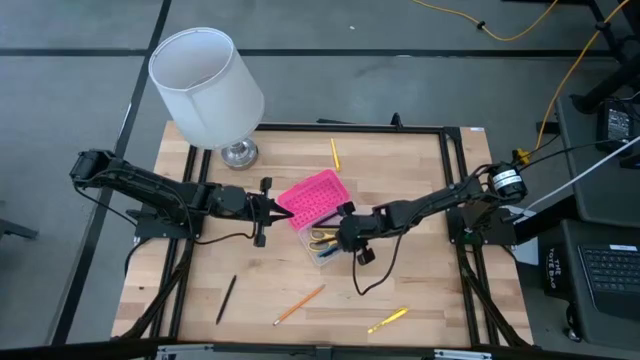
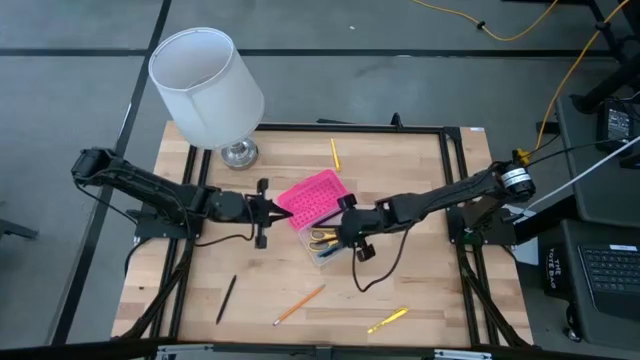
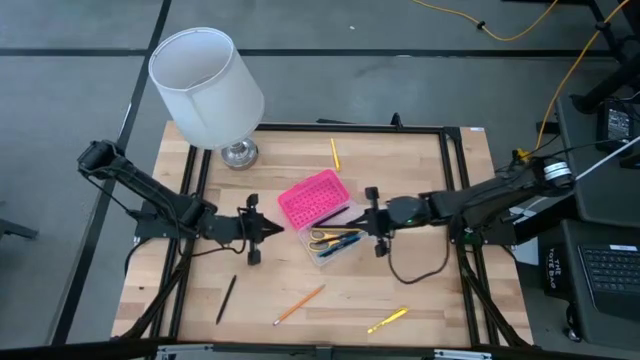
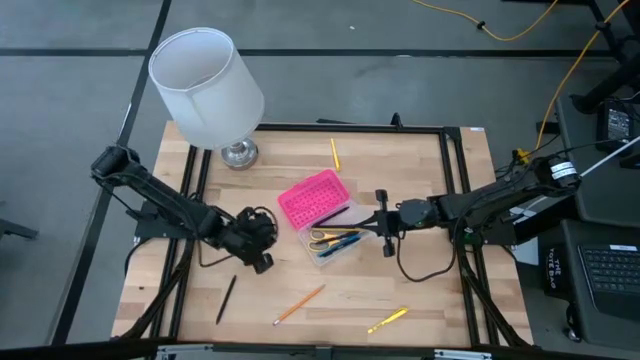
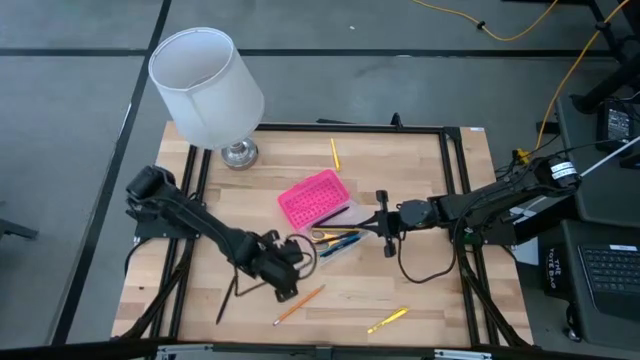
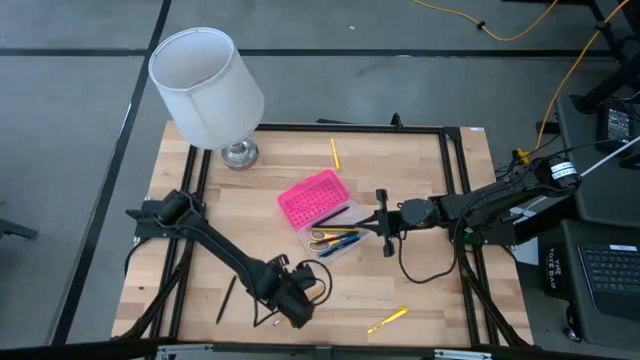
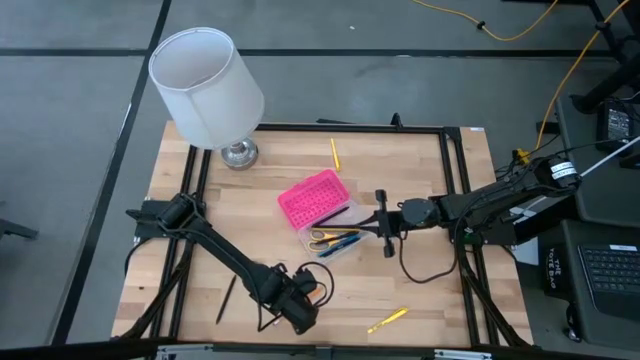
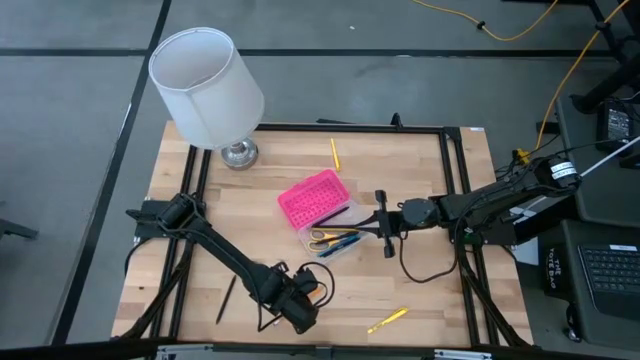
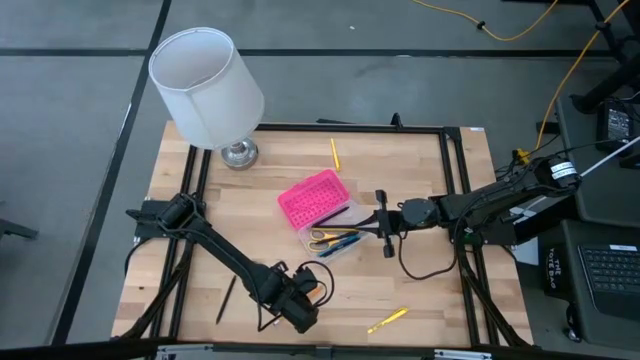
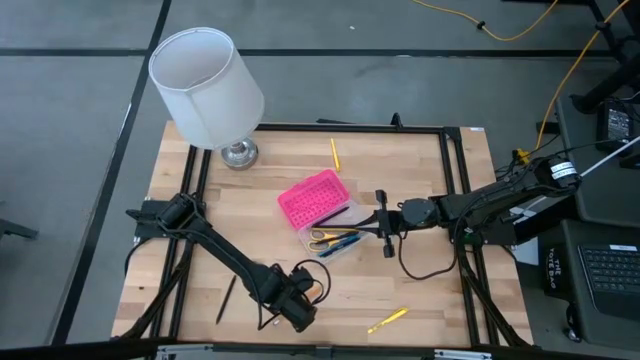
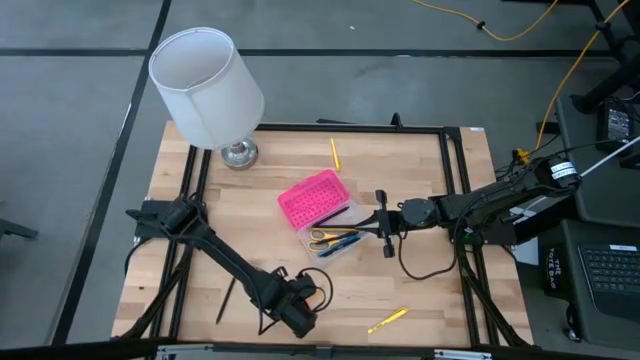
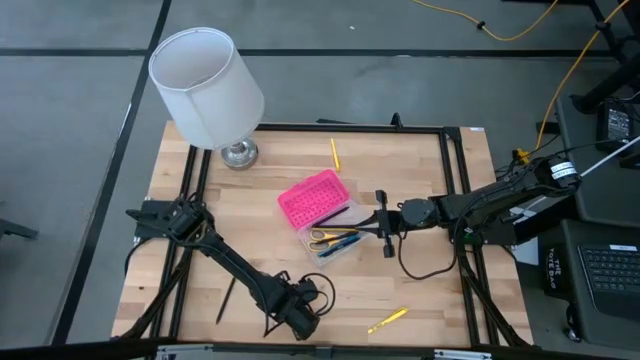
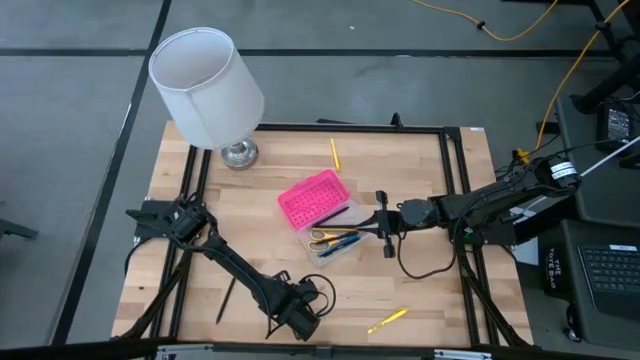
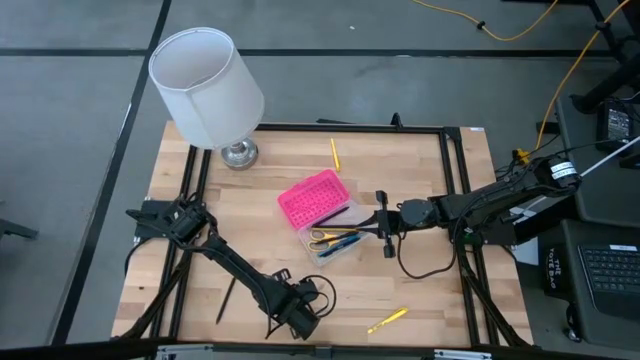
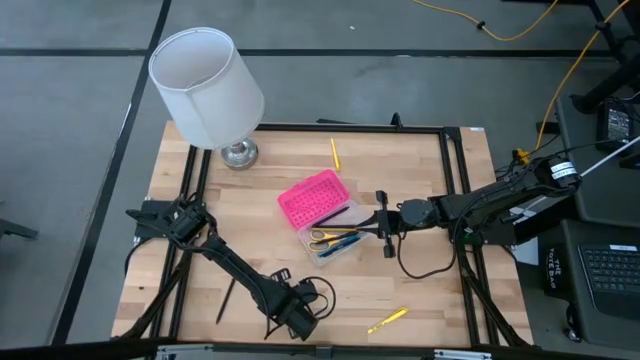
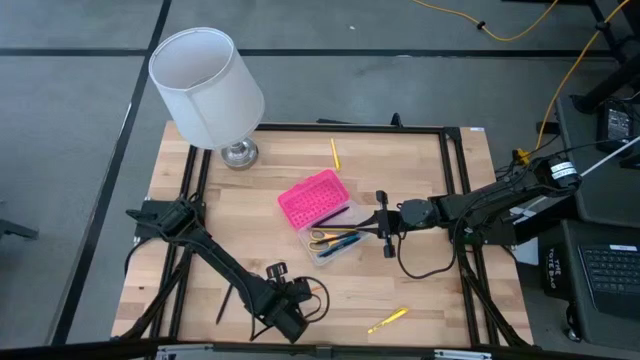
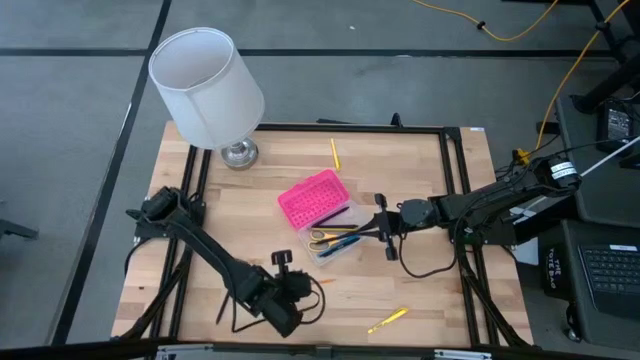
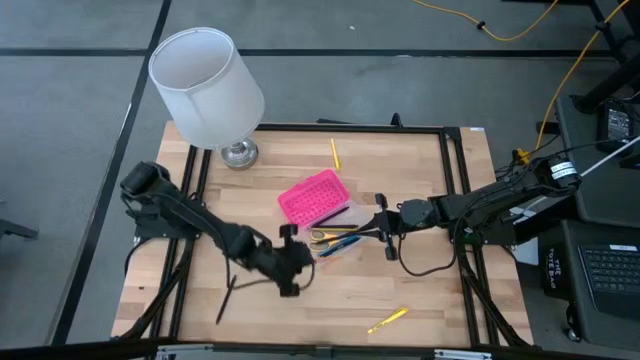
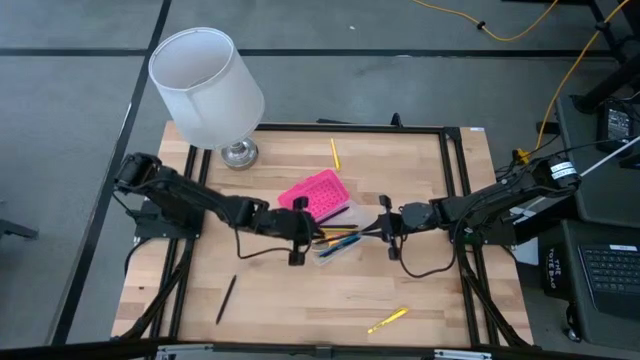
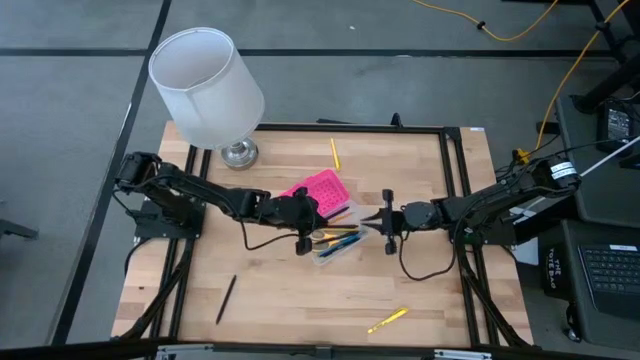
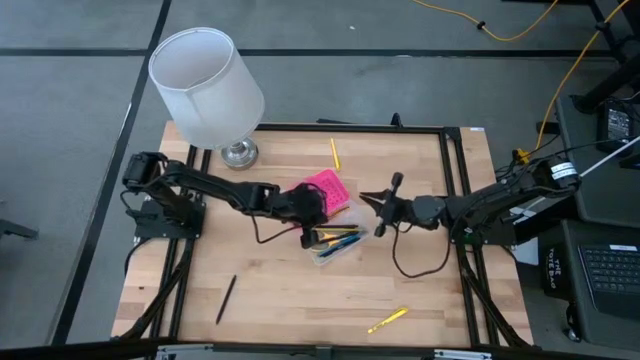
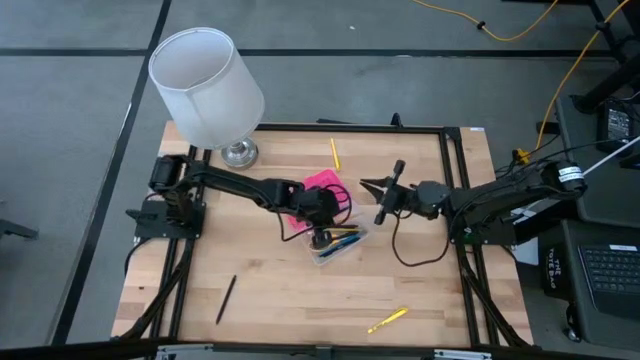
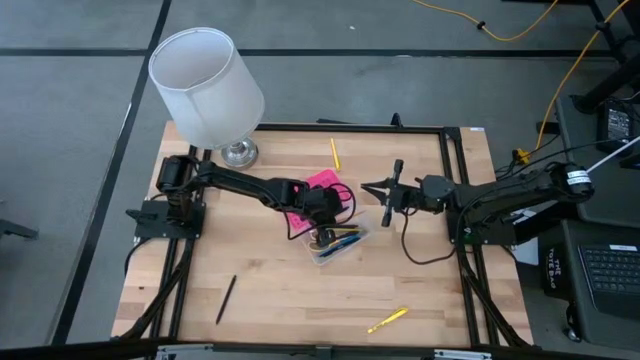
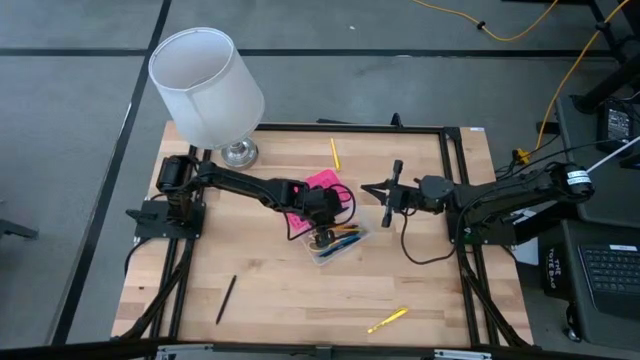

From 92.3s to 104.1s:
Task: Pick & place school supplies into a supply box
Put the orange pencil into the supply box
